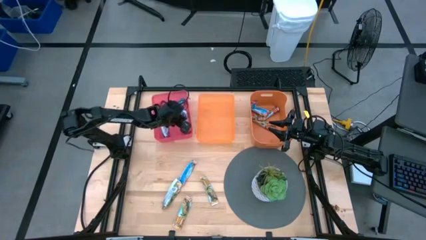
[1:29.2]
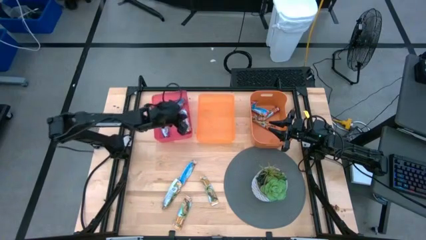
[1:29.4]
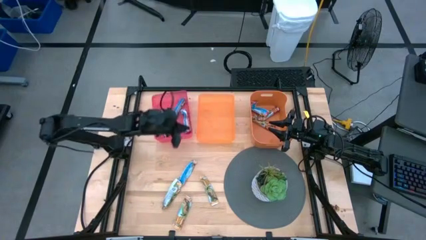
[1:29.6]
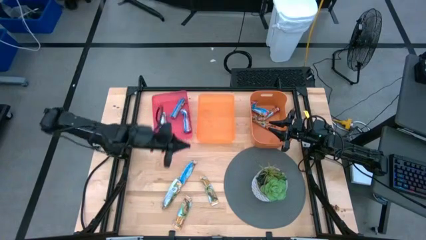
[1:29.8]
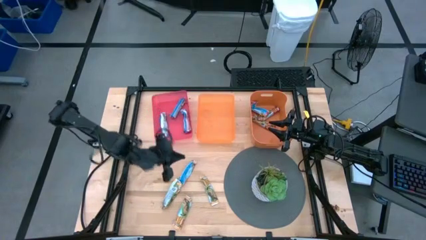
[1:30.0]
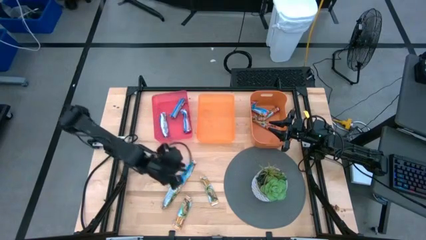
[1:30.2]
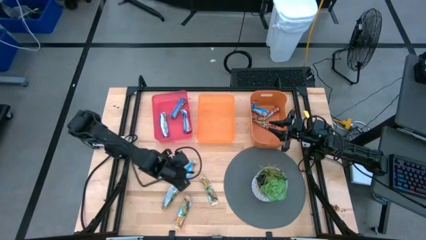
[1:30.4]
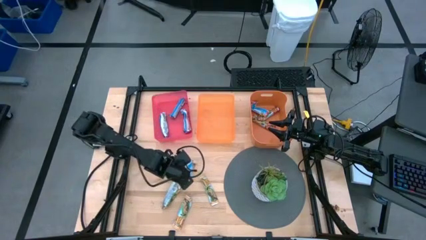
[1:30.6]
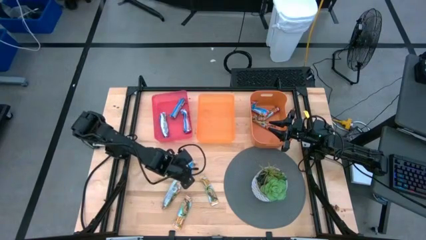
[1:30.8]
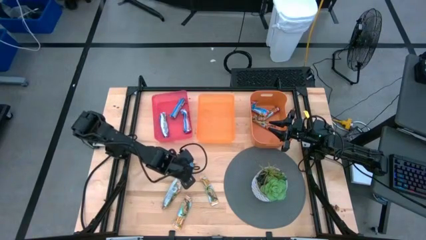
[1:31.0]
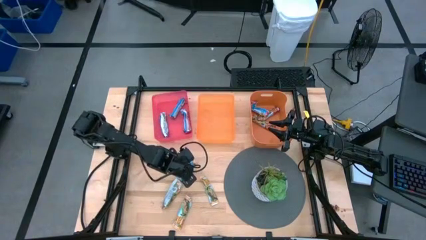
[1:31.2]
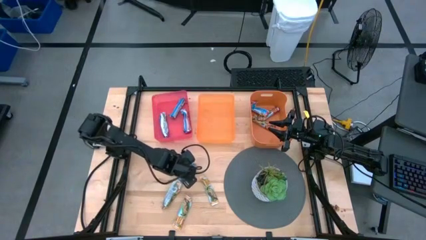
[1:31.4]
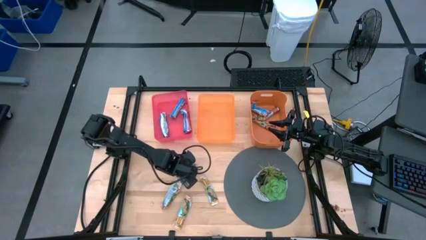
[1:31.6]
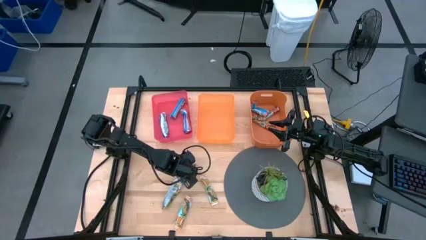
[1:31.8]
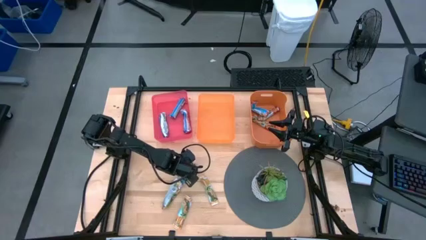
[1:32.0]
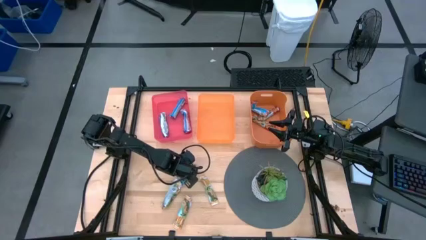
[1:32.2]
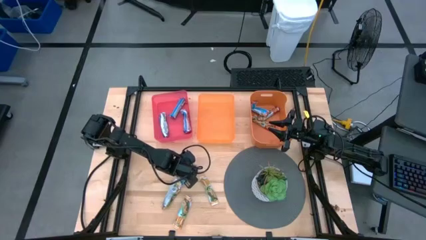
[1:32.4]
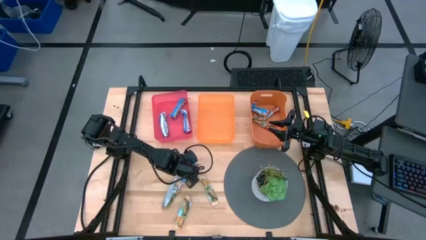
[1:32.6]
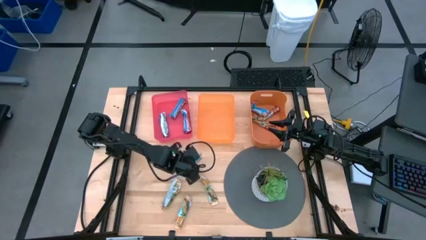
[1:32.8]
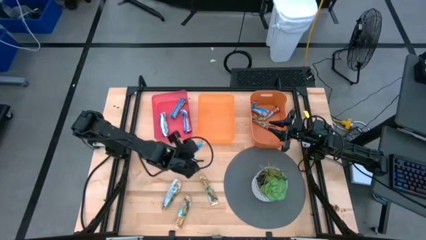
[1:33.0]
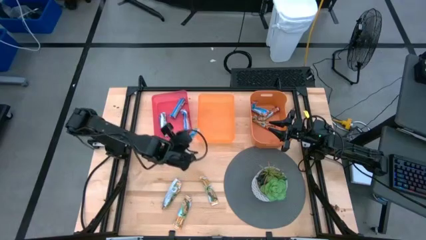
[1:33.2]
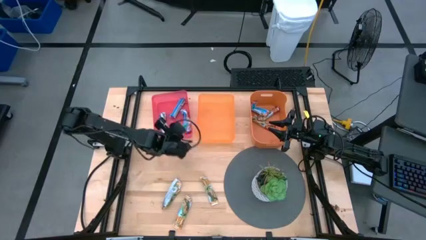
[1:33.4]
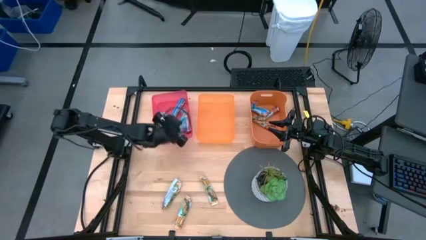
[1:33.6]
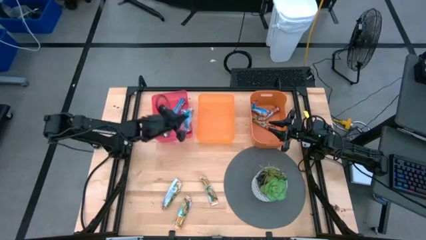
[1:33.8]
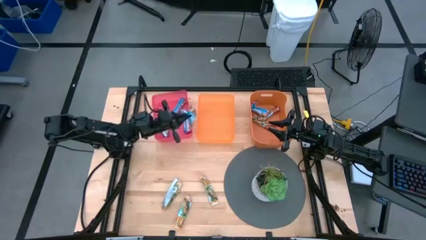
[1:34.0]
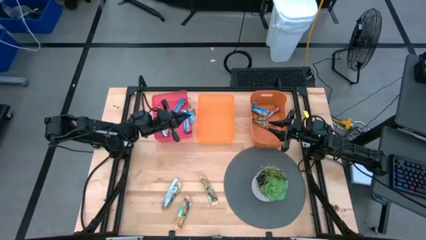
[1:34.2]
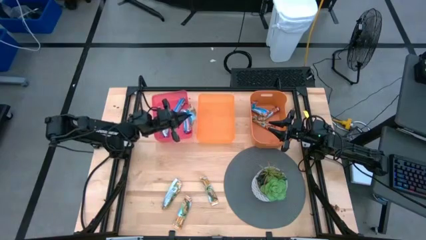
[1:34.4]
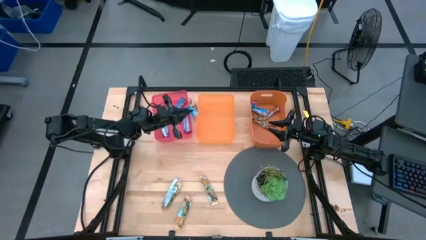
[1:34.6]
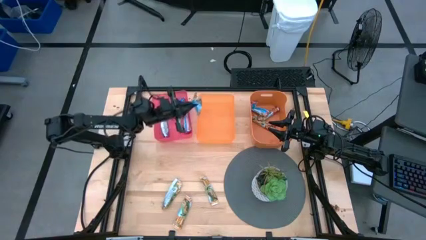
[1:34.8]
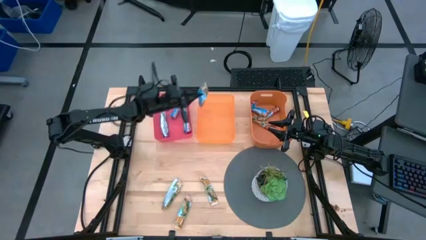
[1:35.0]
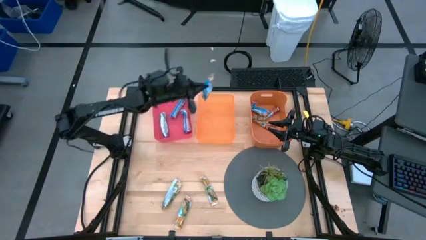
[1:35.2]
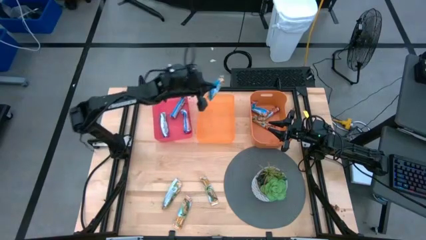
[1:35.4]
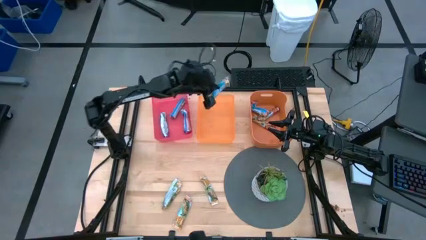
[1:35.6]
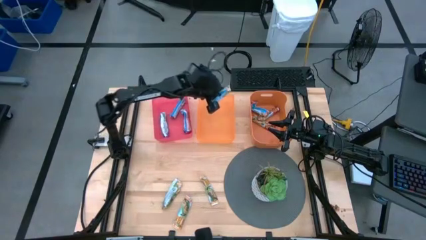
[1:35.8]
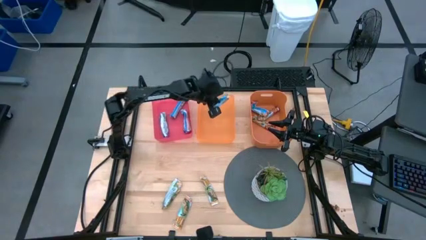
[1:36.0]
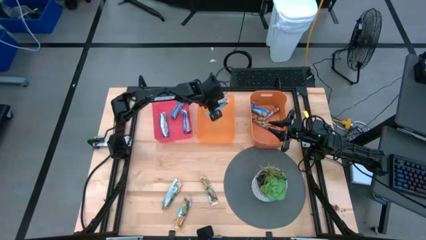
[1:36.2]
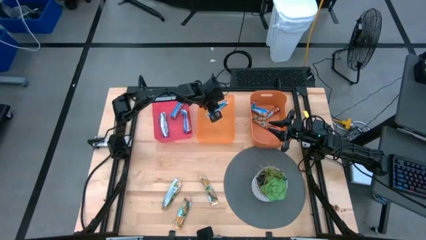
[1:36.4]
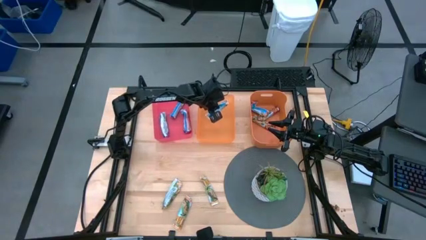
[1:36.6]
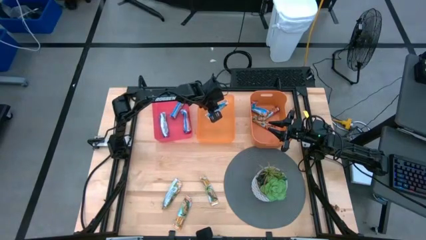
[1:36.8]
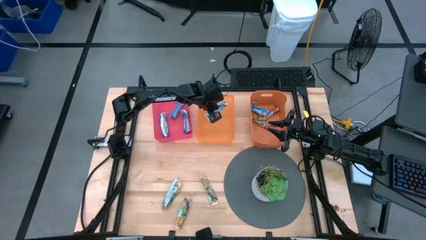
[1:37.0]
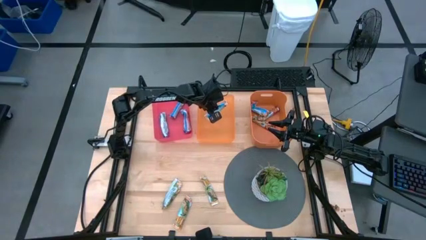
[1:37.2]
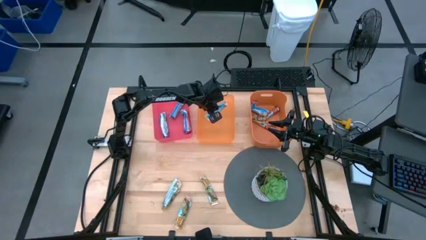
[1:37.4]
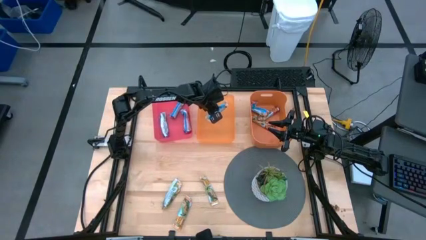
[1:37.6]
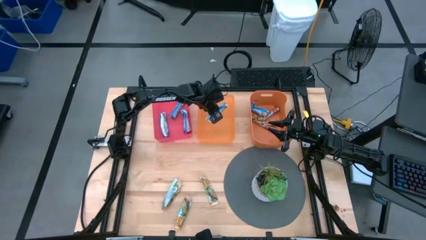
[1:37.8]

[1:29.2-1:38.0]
Task: Pick and place Granola Bars by type
Put the yellow granola bar into the left orange bin

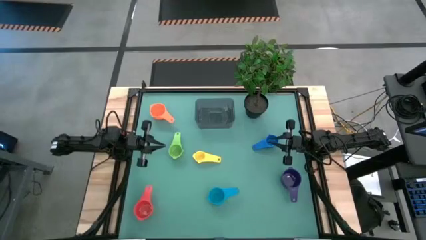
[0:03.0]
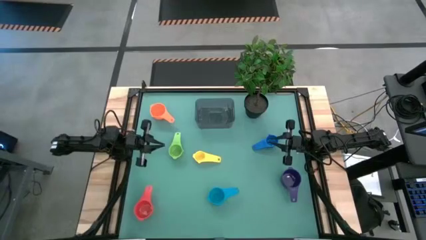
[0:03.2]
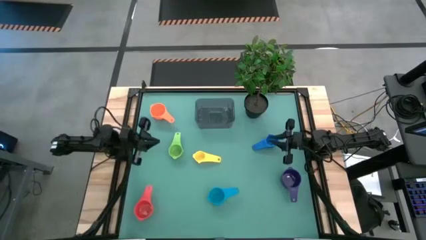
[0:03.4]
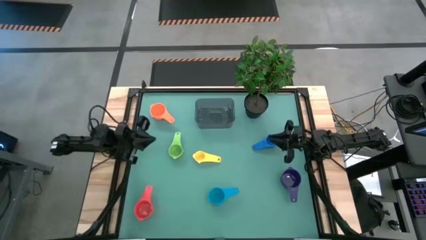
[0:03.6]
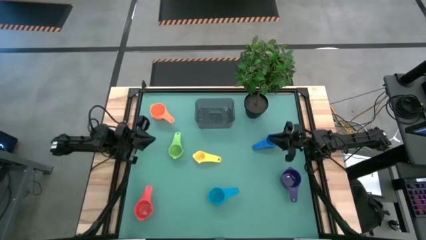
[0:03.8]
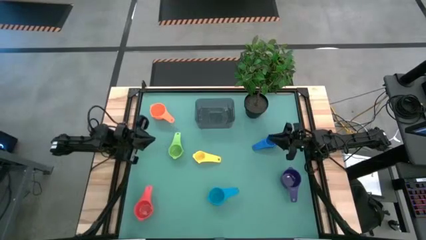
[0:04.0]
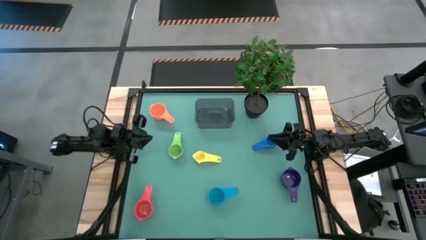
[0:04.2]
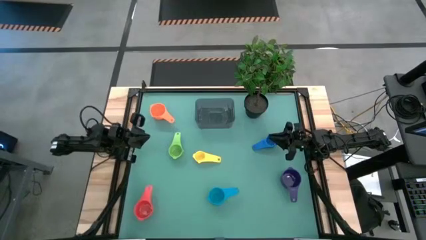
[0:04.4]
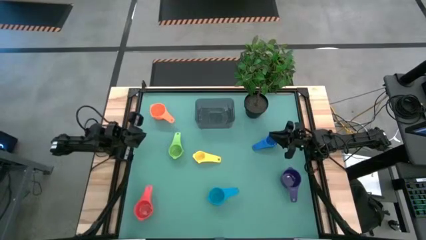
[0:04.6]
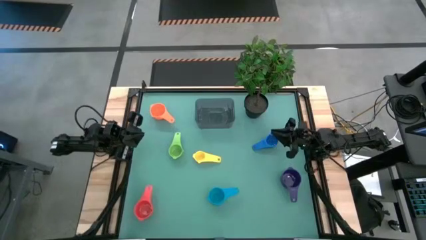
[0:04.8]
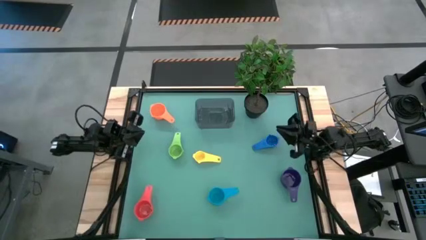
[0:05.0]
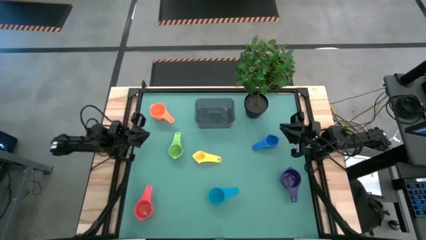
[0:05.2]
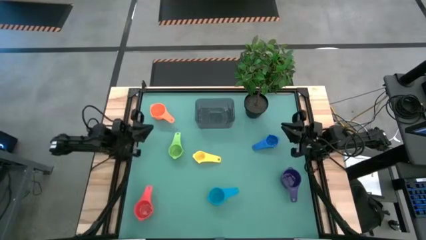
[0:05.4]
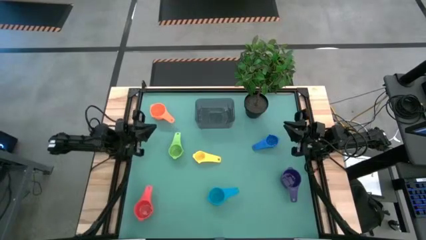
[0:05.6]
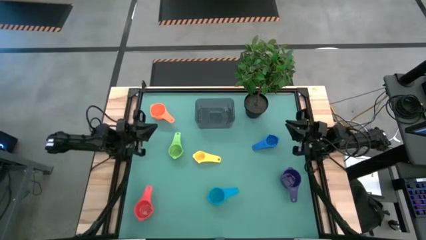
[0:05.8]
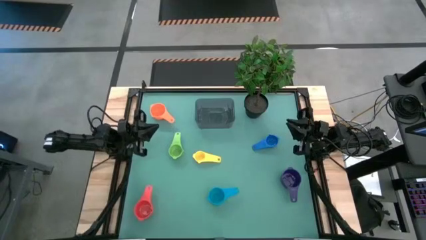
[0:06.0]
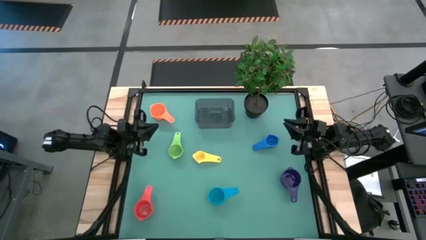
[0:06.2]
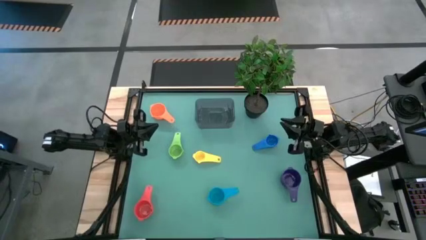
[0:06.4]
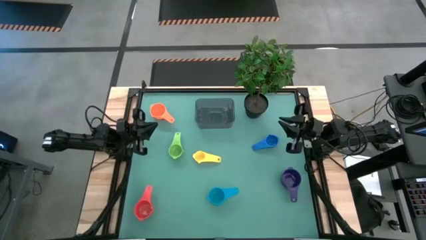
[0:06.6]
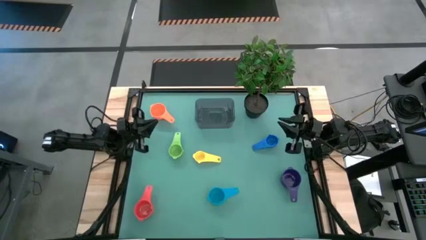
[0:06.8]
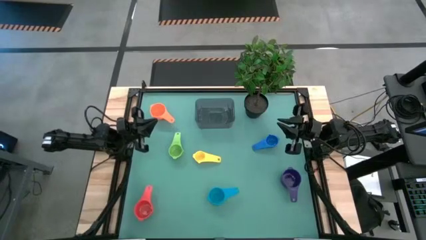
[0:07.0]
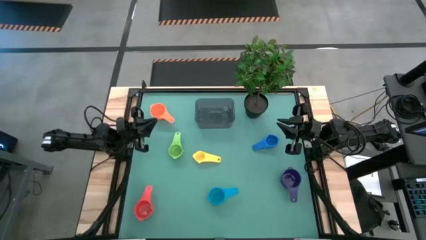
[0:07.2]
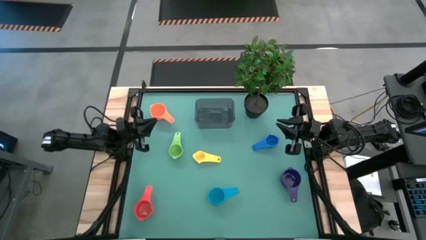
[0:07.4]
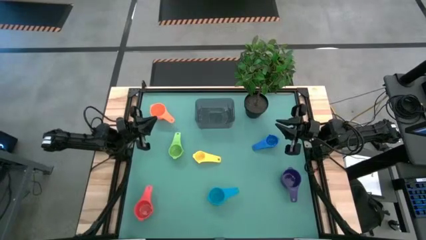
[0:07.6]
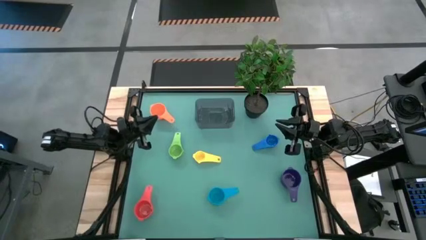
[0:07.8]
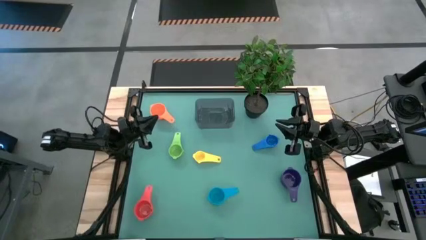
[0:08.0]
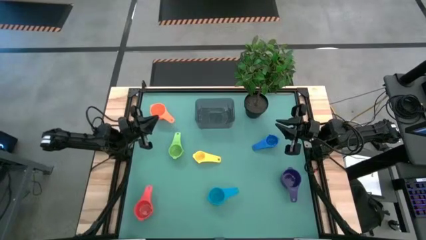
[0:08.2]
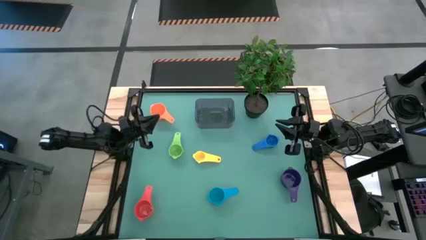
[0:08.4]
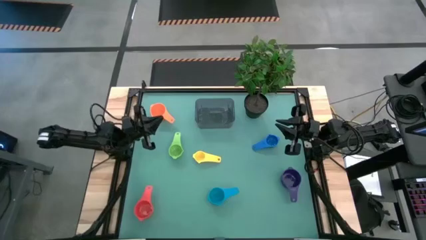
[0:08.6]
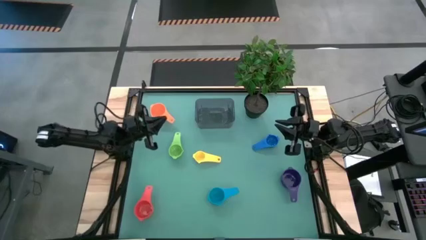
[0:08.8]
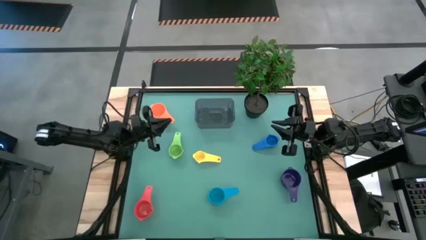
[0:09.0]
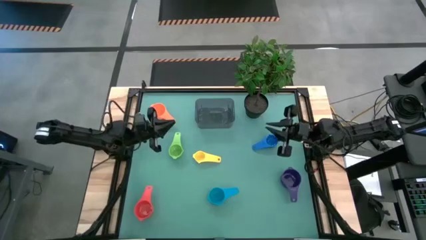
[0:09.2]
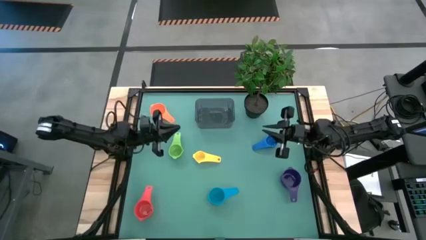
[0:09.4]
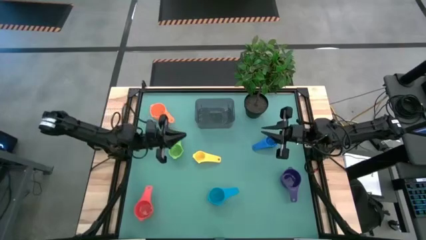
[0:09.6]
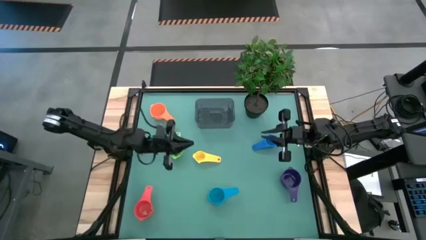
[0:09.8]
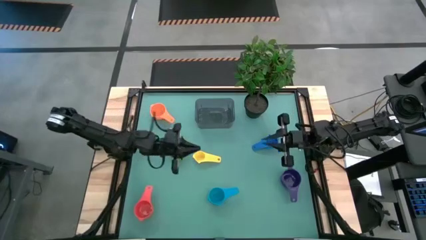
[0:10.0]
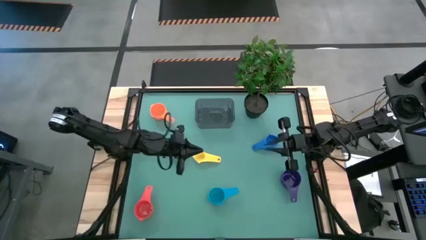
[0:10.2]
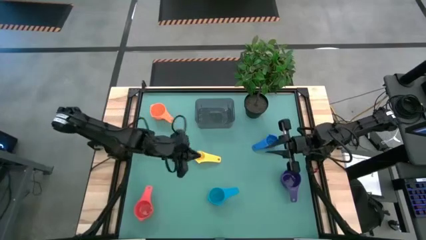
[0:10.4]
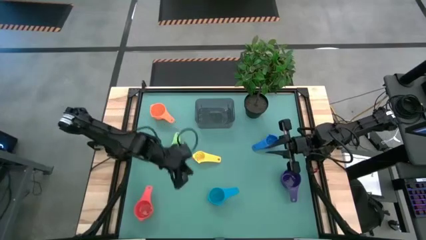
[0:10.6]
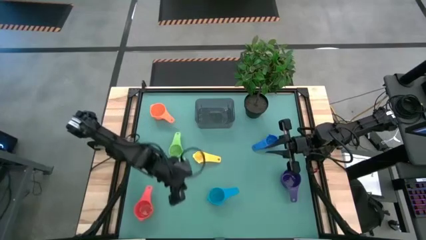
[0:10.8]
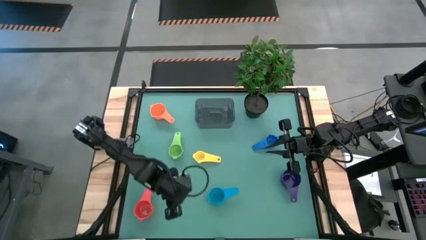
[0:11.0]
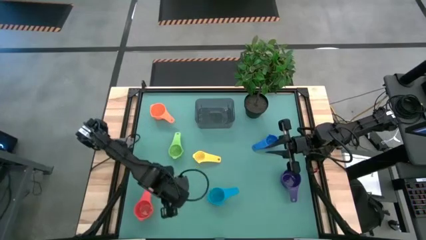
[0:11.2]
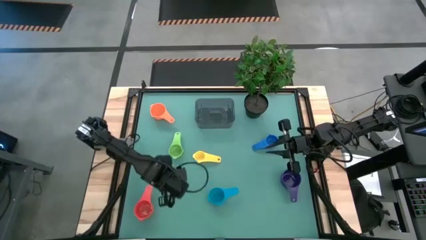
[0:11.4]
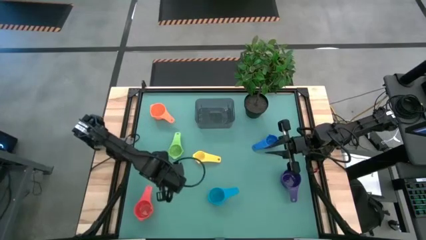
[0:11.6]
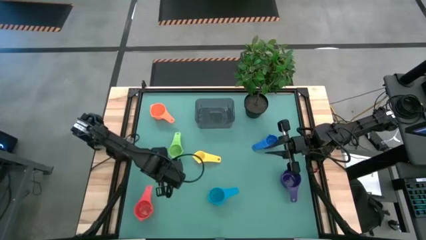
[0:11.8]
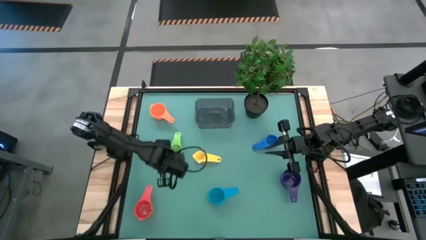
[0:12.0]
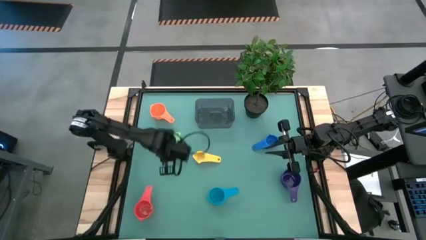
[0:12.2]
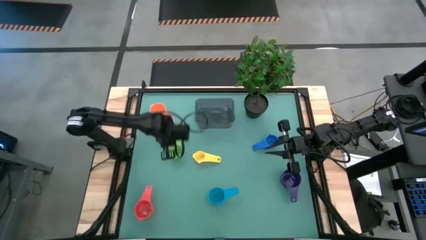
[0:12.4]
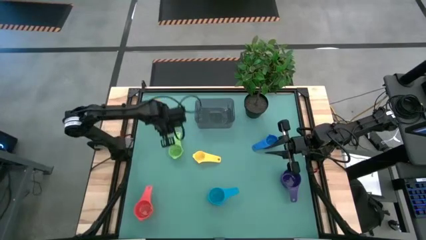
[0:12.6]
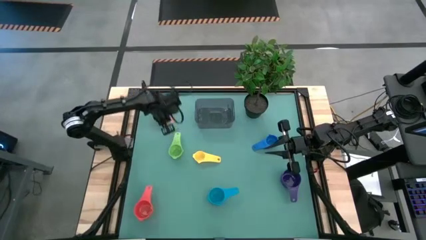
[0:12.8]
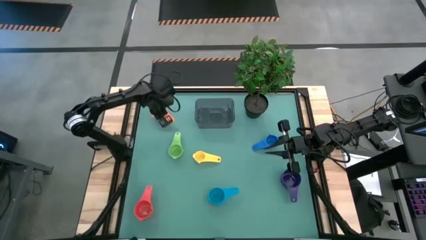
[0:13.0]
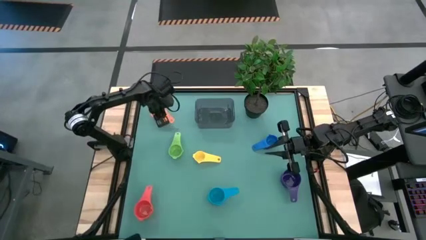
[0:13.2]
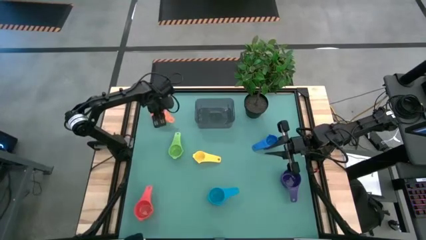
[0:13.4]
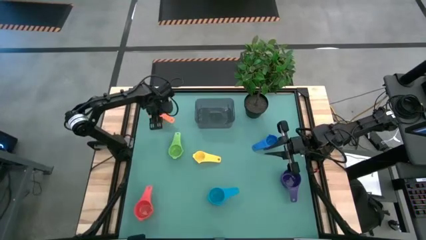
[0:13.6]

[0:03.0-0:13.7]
Task: Nest measuring cups in basket
Stack the orange measuring cup into the purple measuring cup
